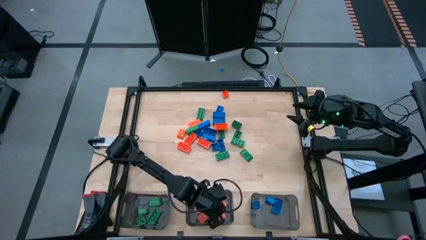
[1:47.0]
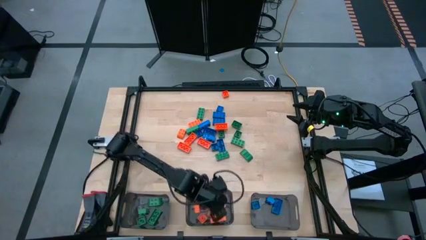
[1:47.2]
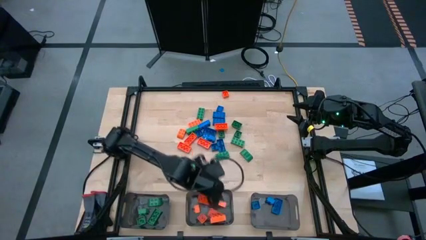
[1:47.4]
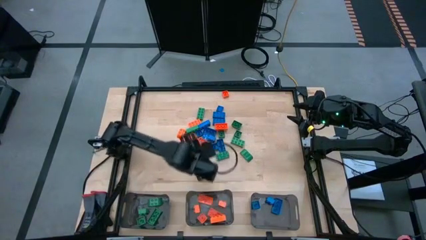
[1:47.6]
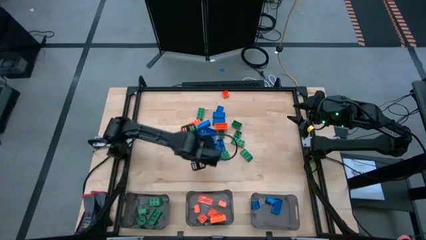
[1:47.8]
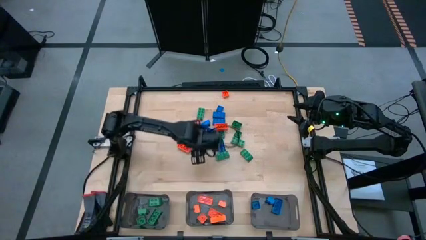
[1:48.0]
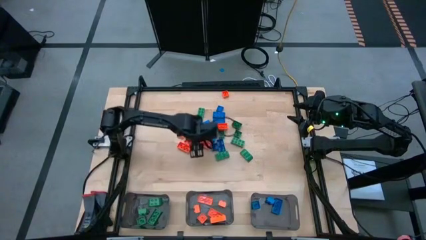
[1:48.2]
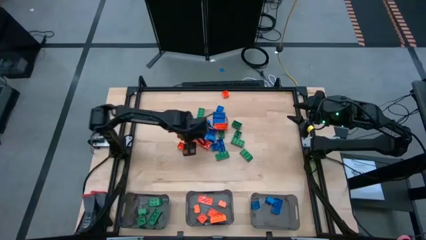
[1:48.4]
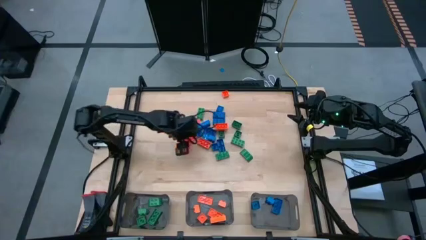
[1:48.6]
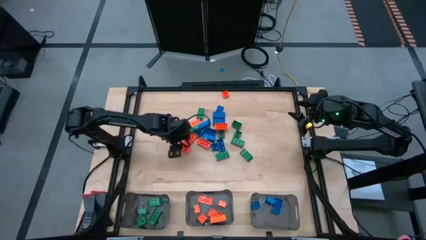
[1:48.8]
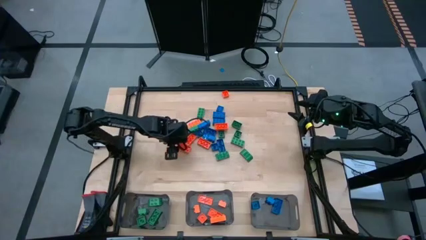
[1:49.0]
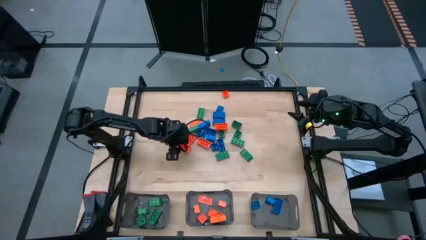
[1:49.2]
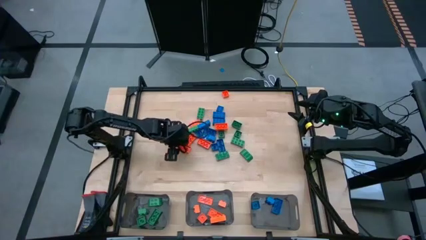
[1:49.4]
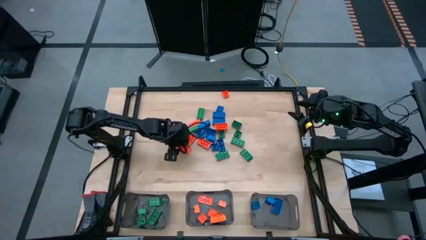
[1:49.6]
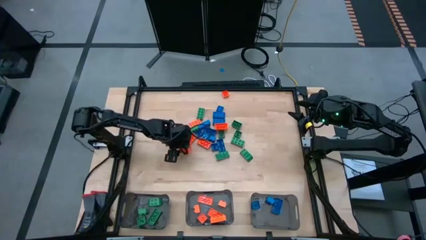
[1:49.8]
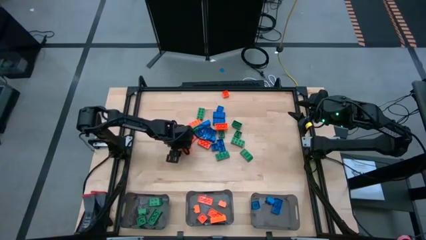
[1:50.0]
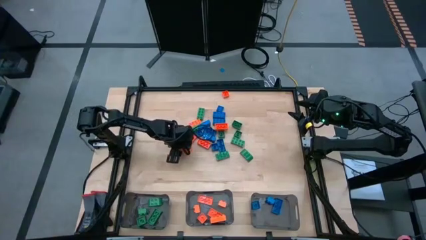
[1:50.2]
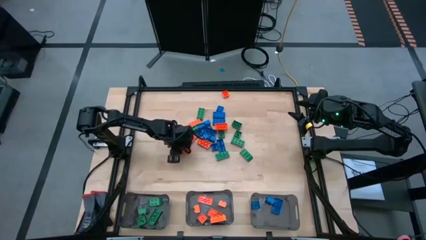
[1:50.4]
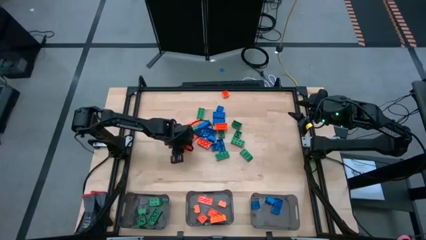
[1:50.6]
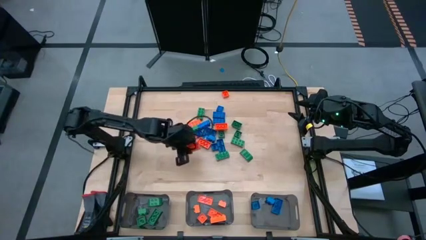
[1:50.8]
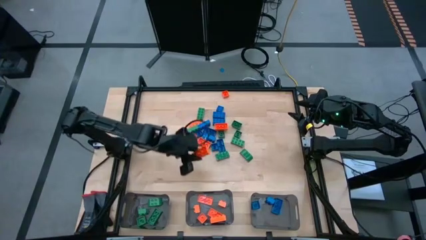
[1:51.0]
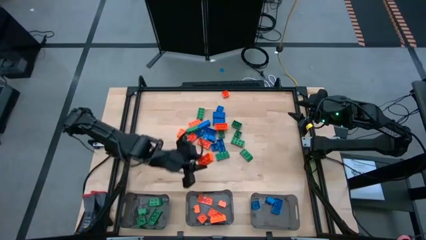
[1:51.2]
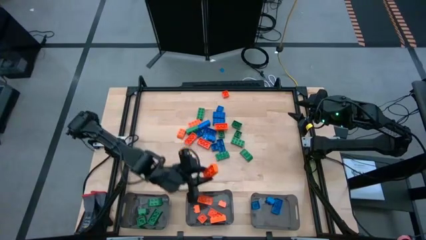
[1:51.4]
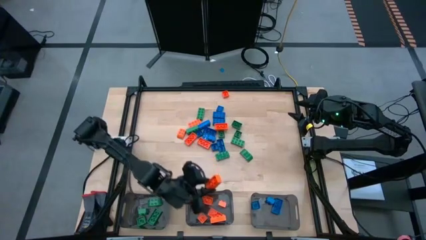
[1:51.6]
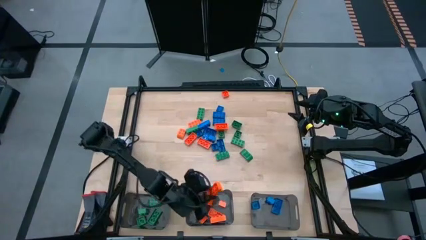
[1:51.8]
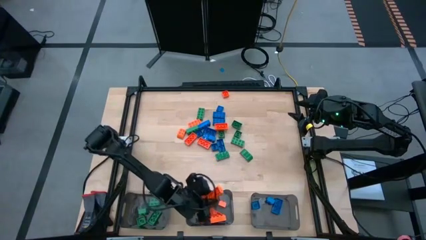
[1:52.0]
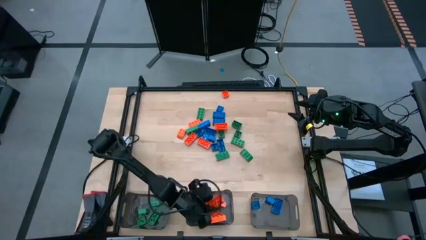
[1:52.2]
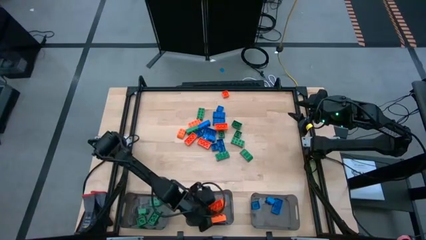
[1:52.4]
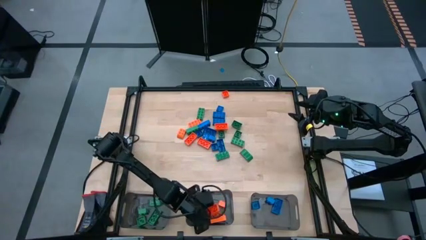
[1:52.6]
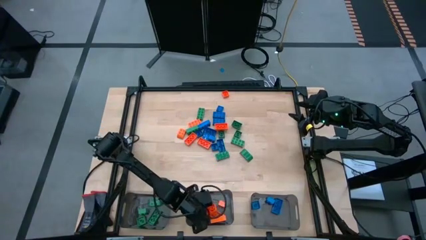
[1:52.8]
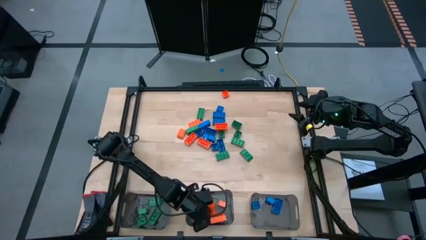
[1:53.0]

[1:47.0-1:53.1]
Task: Sort blocks
Put the orange game piece into the middle black bin

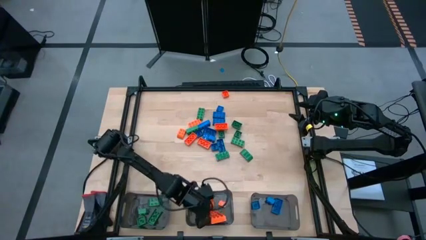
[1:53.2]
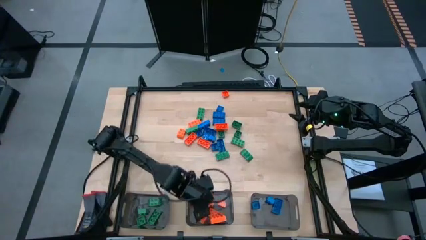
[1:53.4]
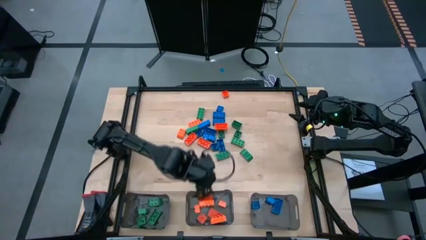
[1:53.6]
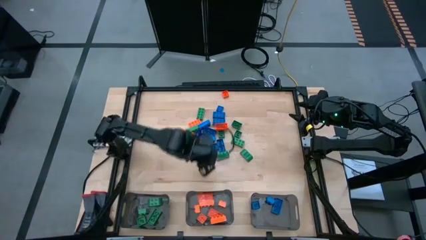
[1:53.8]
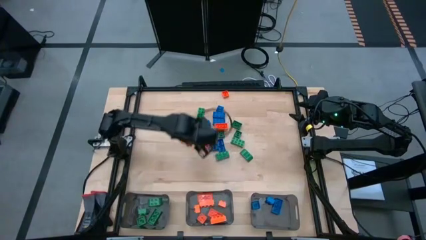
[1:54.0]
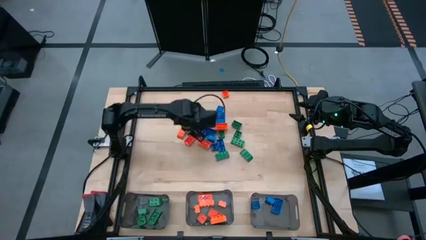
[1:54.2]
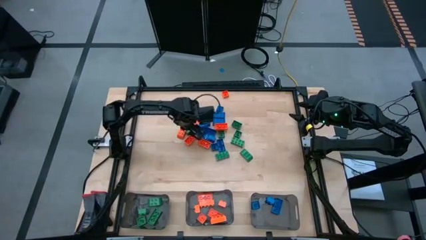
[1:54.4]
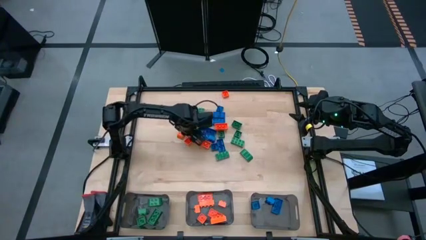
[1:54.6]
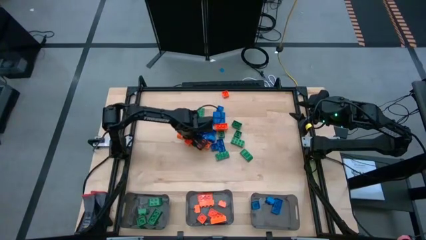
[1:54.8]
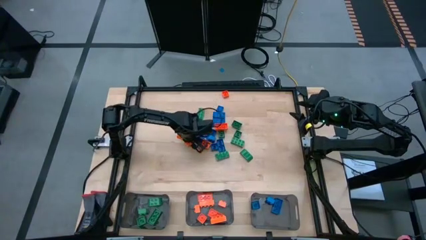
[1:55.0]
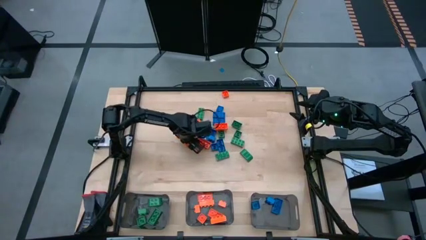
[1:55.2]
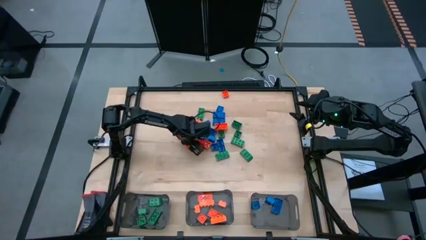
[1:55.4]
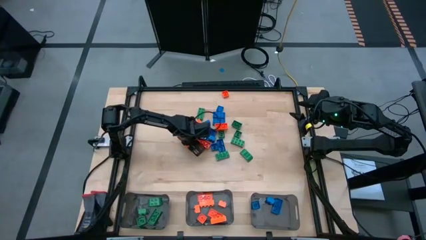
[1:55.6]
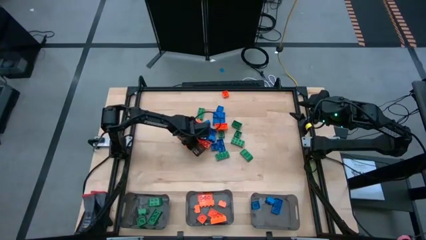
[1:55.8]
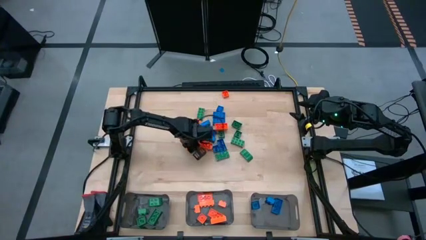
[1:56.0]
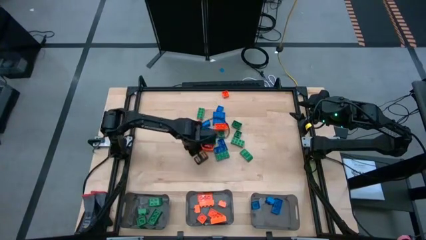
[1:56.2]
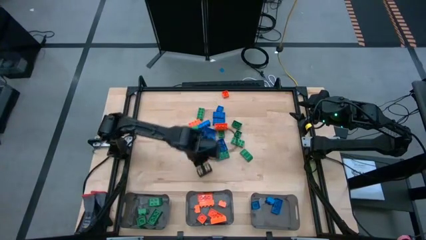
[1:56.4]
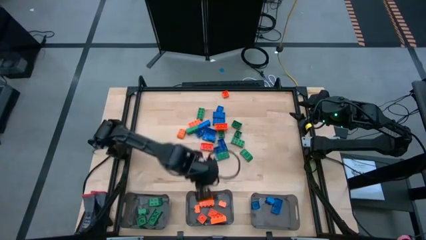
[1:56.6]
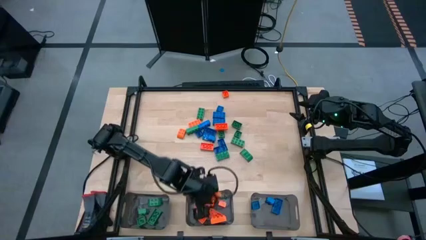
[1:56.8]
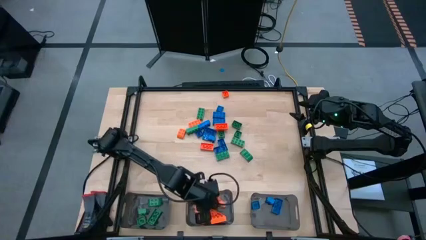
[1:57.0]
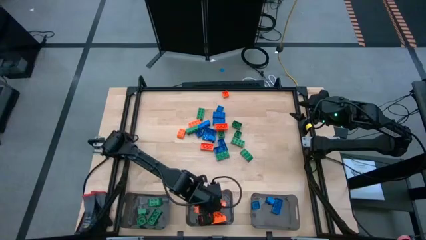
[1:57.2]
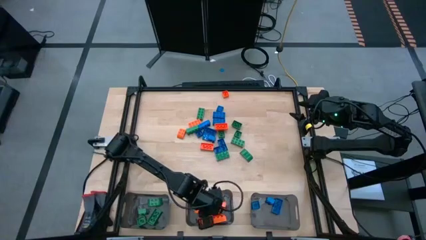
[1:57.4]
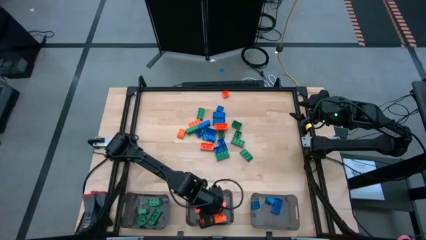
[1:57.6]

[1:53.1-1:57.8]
Put the orange game piece into the middle black bin

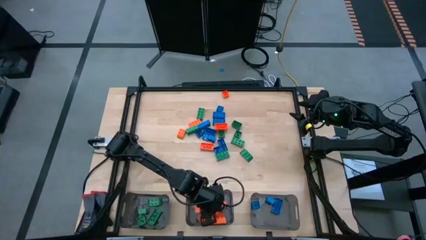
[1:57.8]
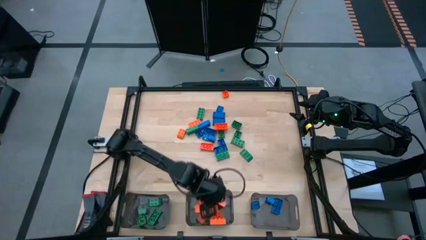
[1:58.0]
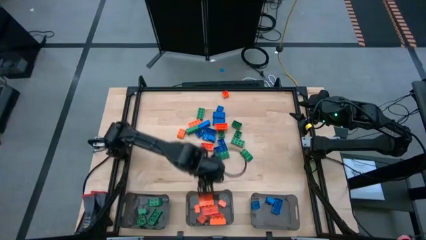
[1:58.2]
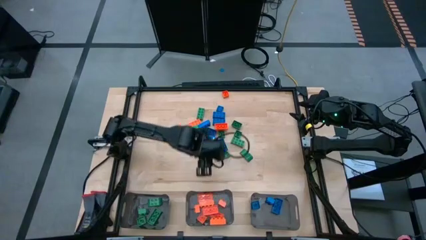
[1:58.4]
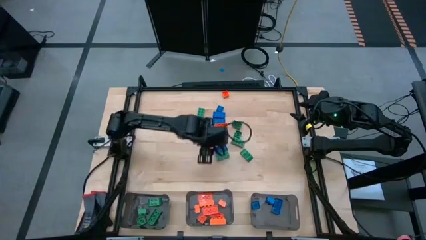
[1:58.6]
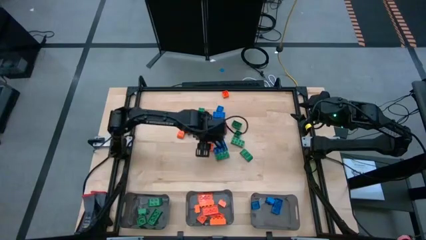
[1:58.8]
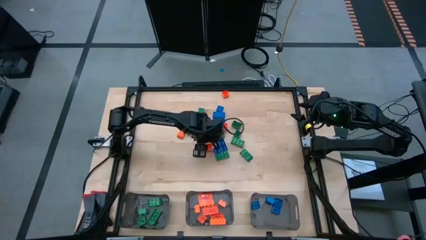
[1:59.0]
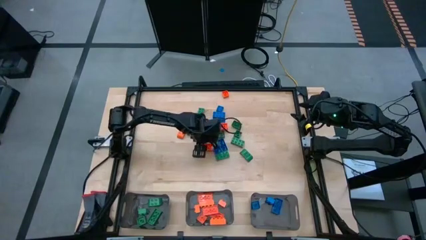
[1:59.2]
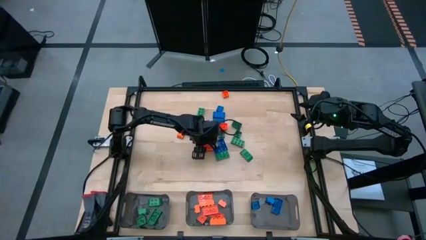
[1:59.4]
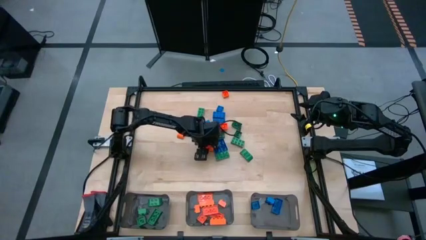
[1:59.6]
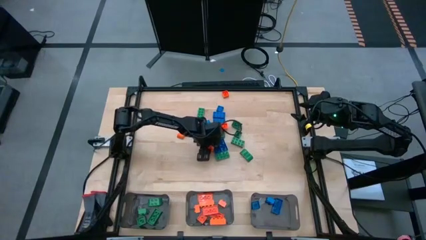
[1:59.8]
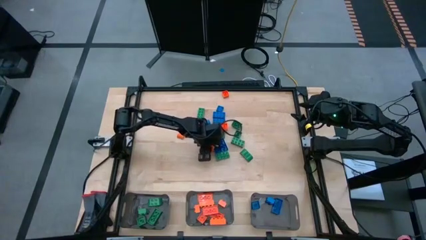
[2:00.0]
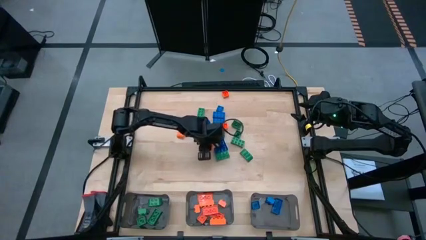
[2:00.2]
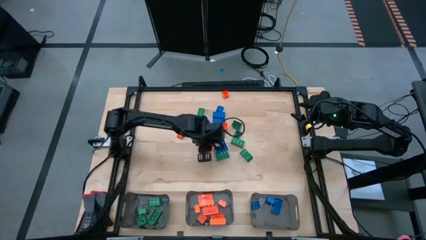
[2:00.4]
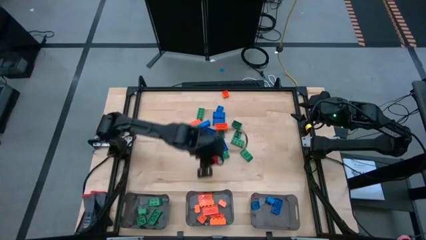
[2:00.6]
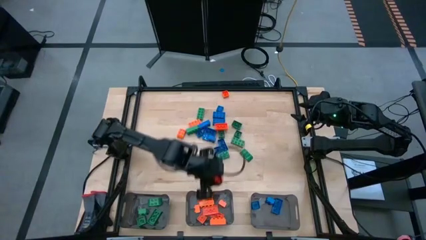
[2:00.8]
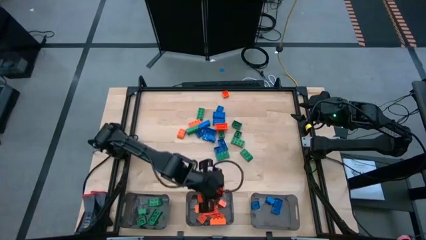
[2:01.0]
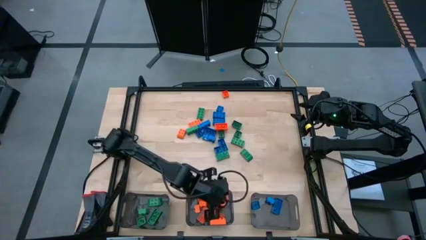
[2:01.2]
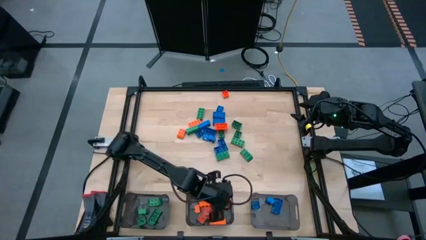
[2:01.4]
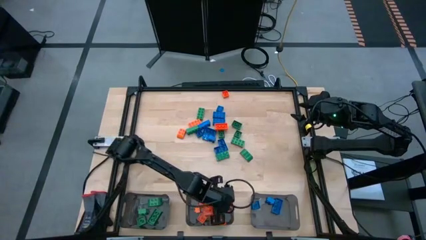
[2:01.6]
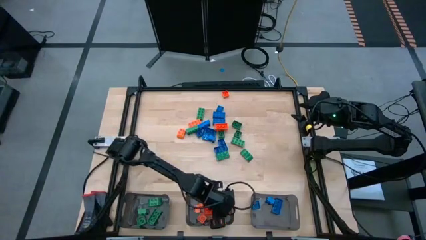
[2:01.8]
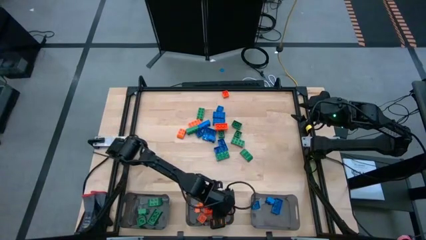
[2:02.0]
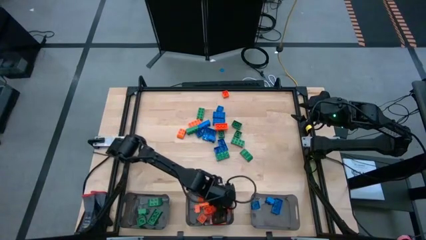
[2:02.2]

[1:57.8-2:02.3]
Put the orange game piece into the middle black bin

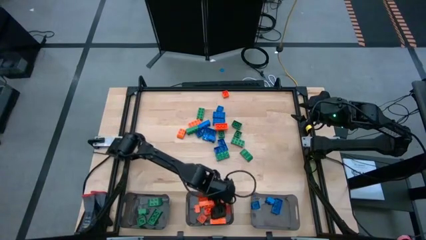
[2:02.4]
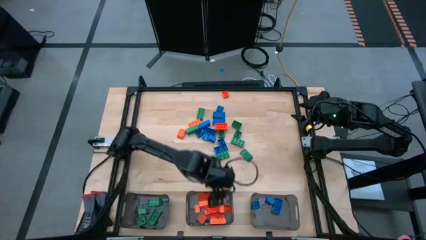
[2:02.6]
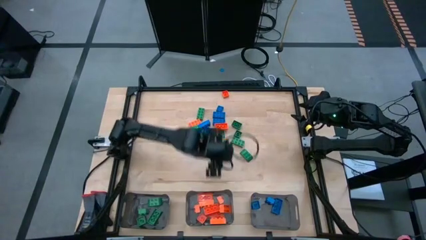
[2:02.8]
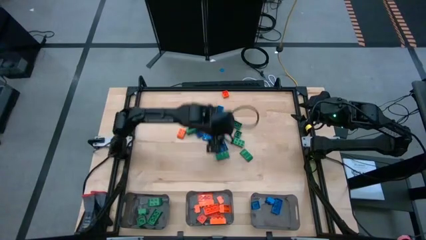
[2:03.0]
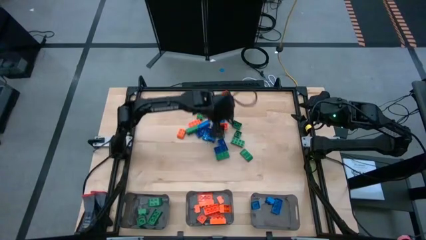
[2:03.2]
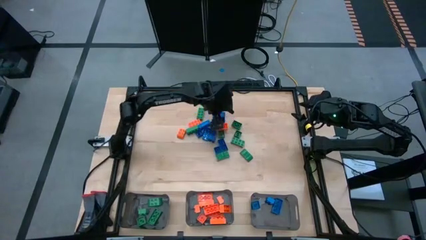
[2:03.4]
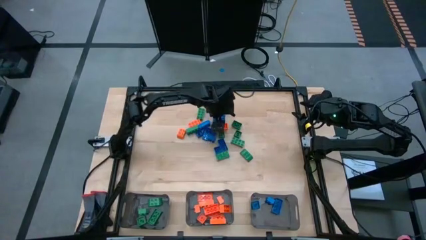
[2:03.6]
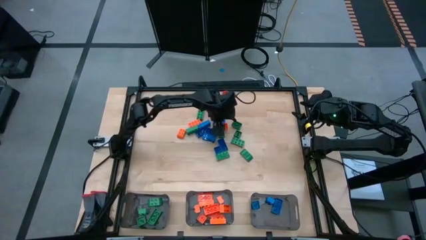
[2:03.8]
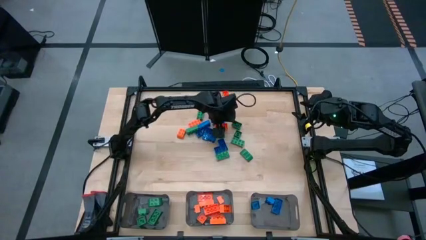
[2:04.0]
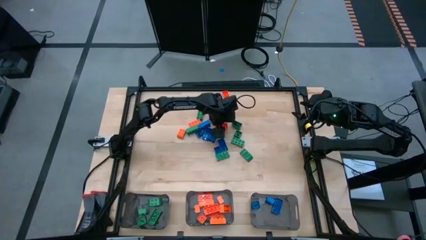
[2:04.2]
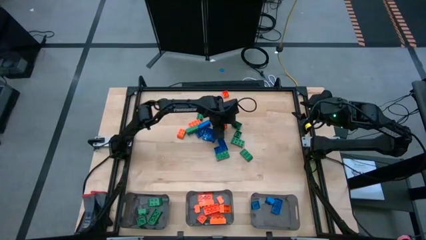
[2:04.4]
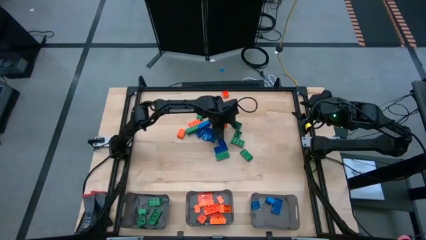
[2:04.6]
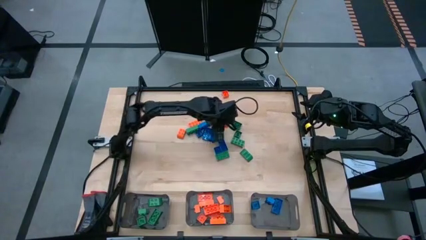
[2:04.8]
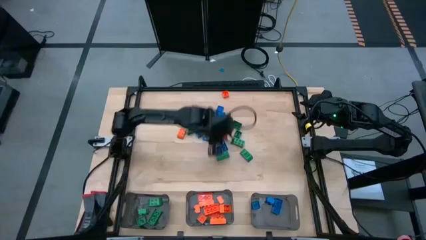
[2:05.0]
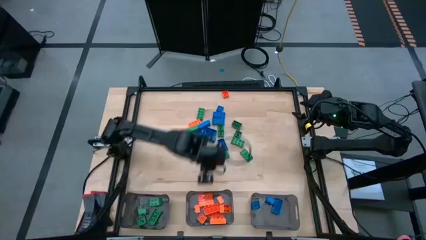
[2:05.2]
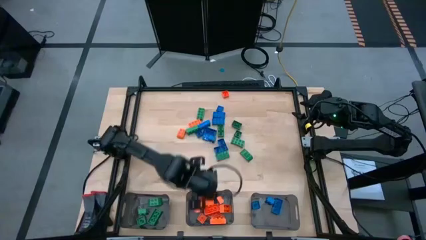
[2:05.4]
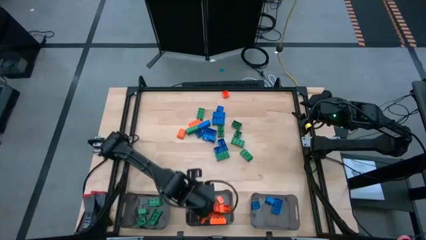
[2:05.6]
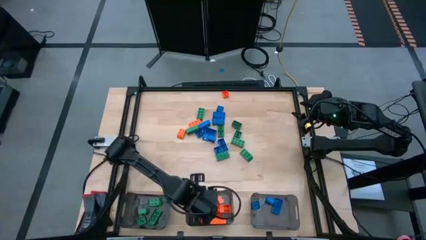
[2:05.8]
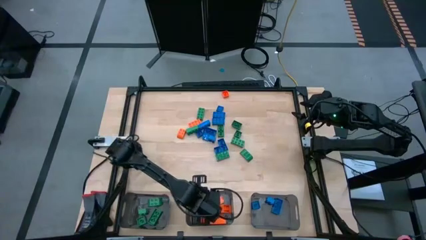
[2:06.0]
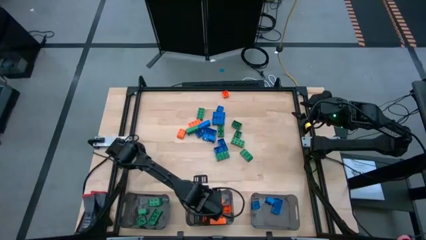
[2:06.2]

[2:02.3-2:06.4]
Put the orange game piece into the middle black bin
